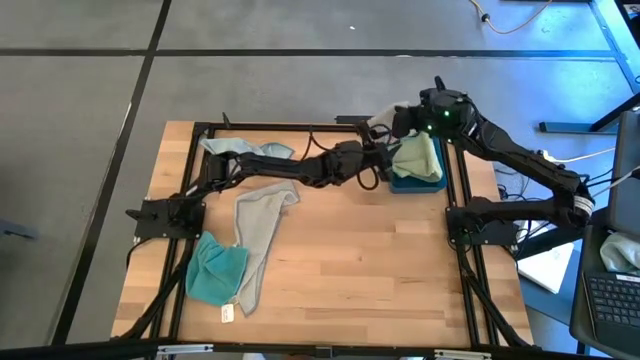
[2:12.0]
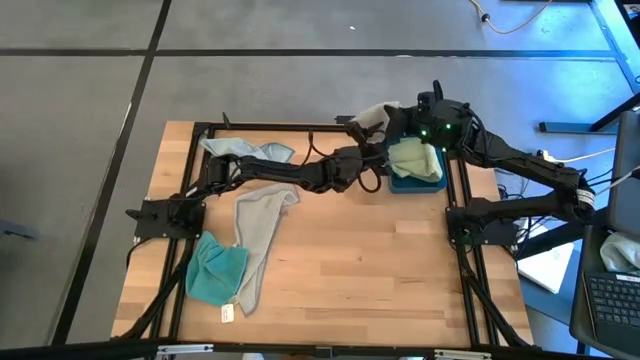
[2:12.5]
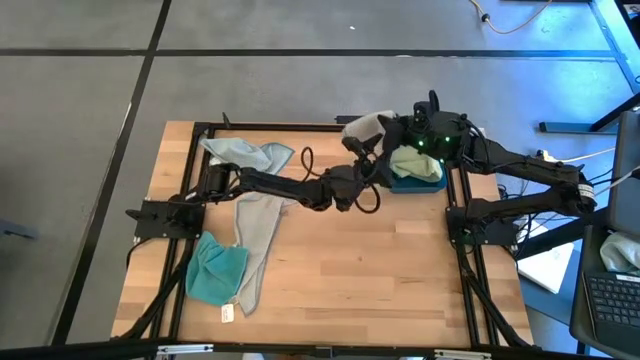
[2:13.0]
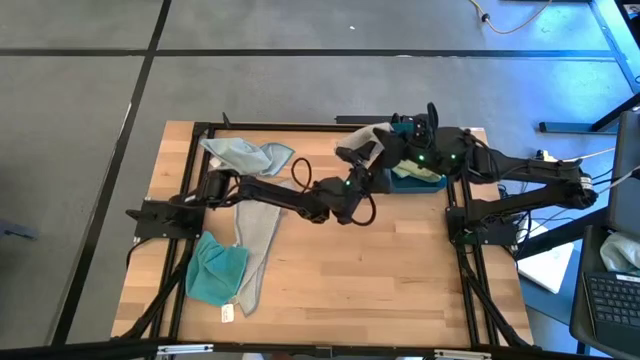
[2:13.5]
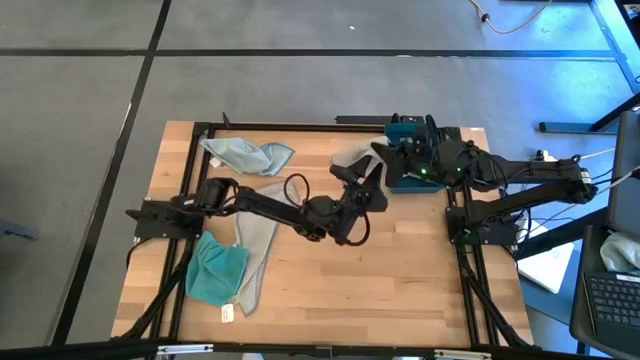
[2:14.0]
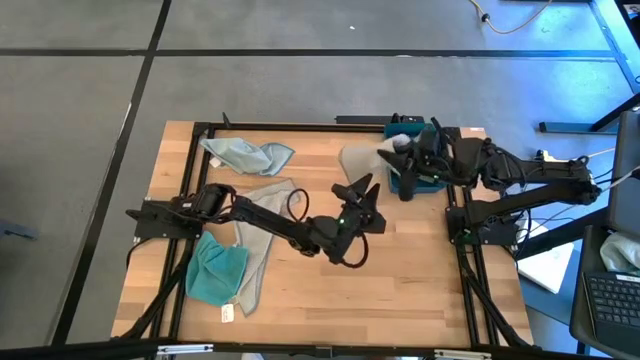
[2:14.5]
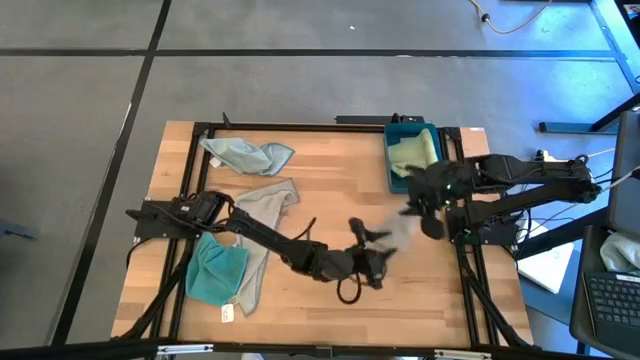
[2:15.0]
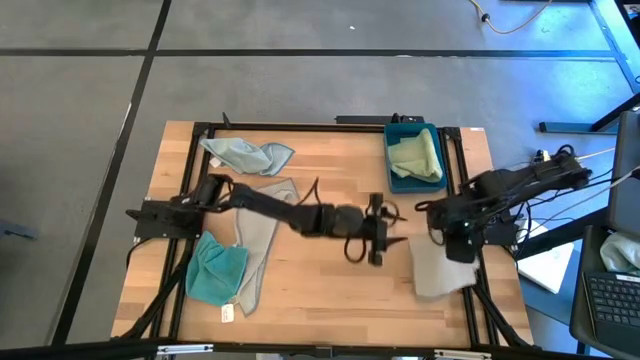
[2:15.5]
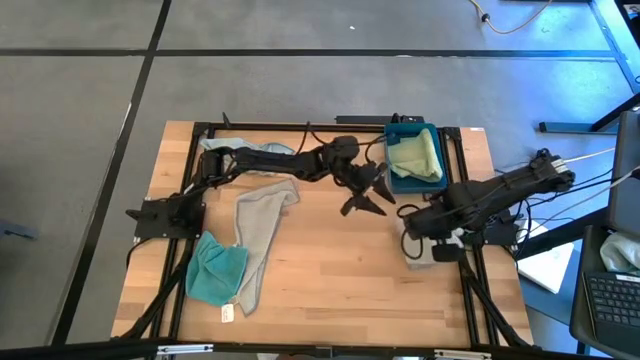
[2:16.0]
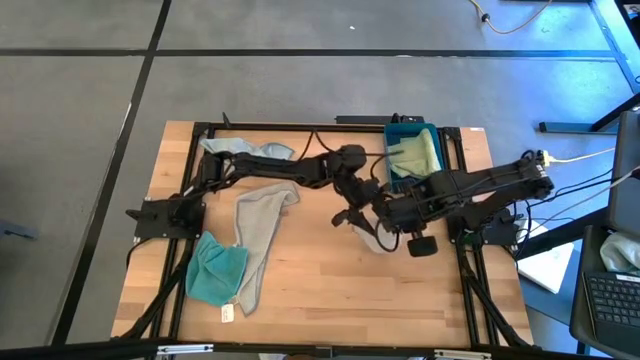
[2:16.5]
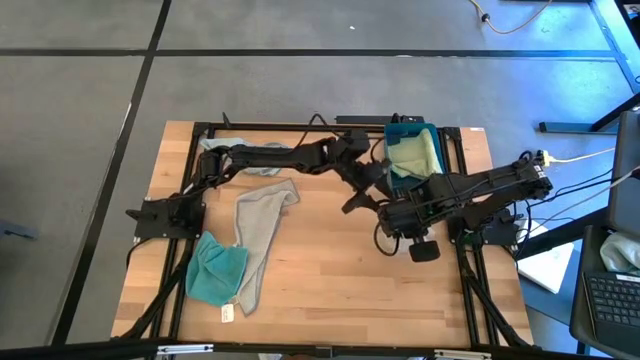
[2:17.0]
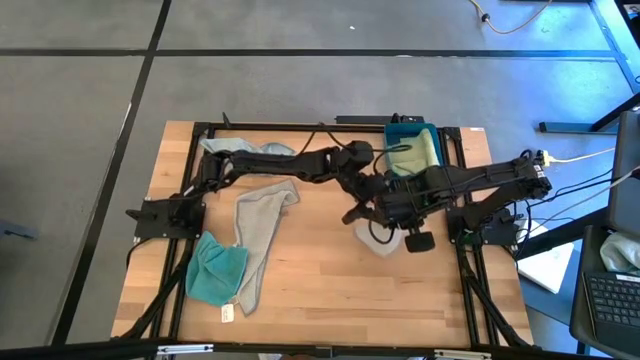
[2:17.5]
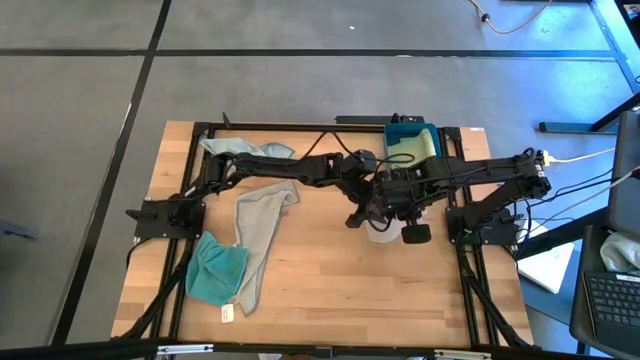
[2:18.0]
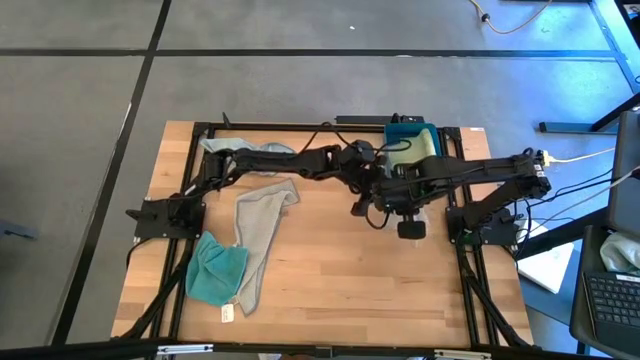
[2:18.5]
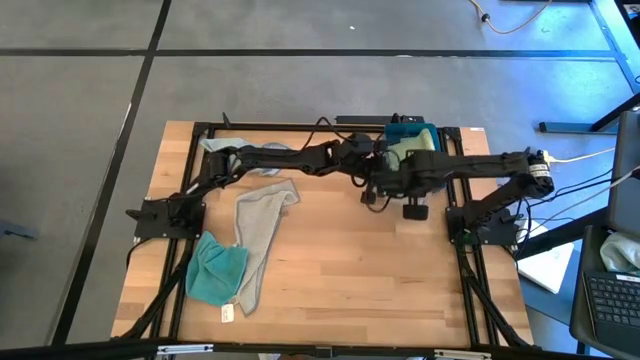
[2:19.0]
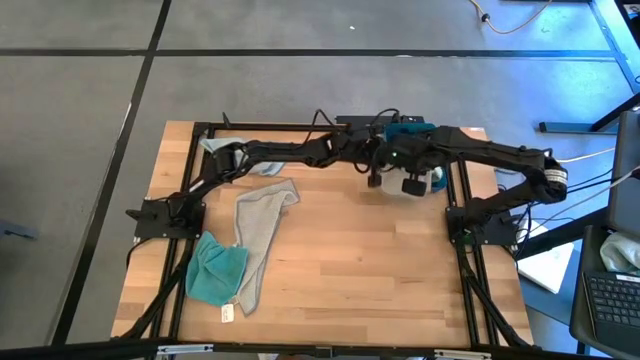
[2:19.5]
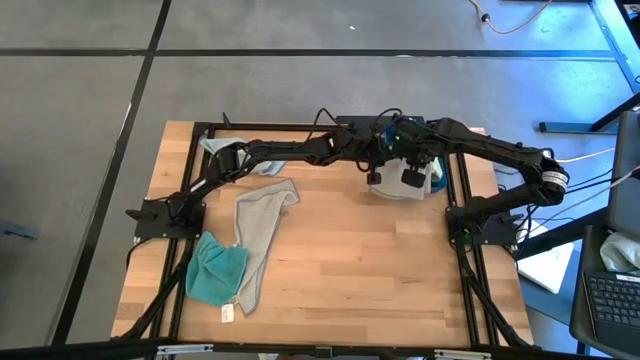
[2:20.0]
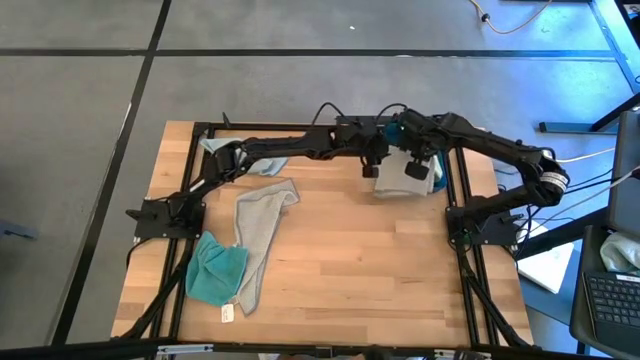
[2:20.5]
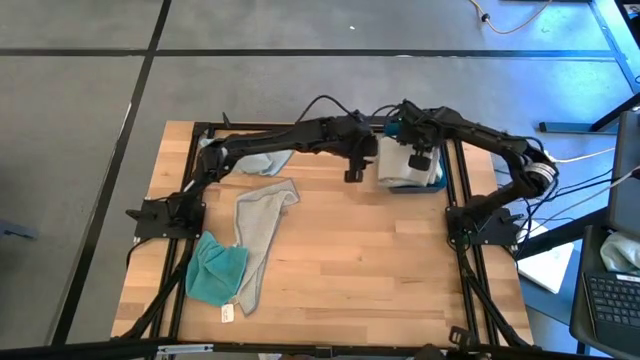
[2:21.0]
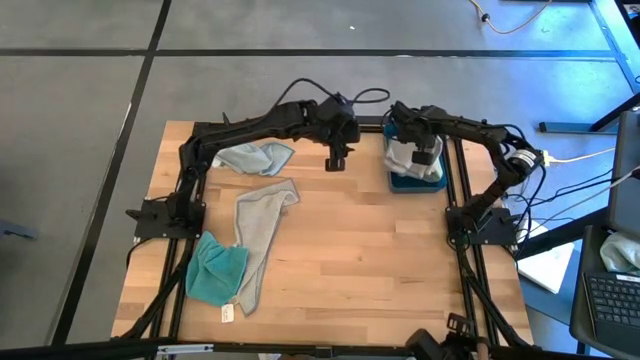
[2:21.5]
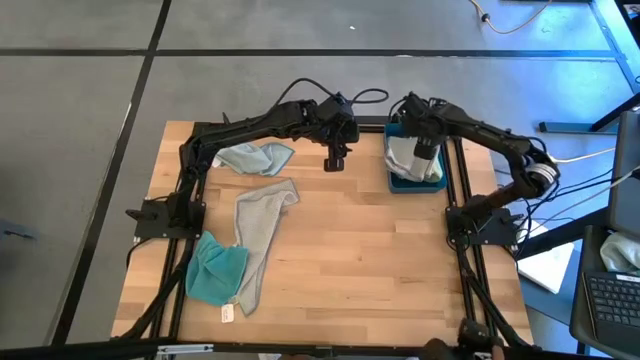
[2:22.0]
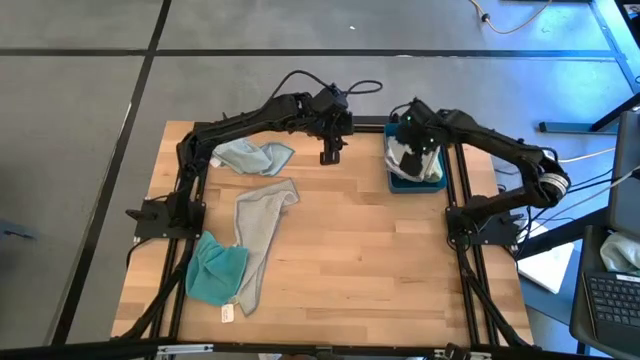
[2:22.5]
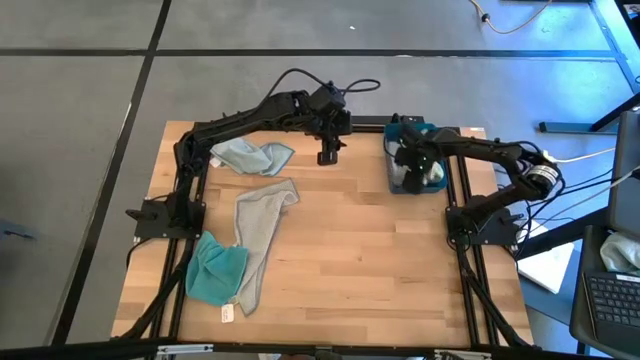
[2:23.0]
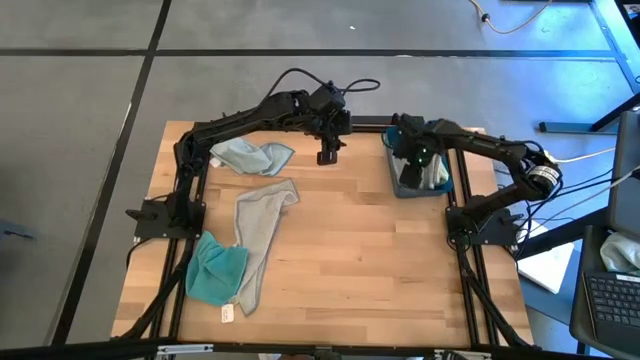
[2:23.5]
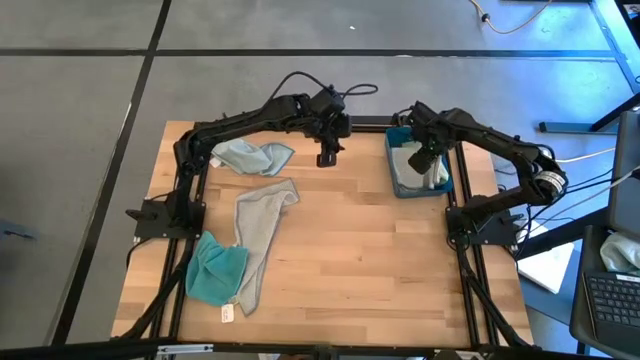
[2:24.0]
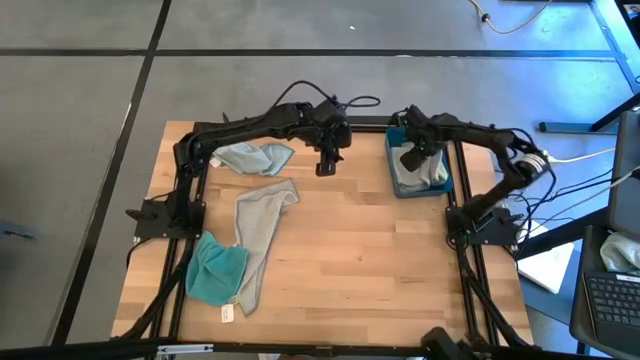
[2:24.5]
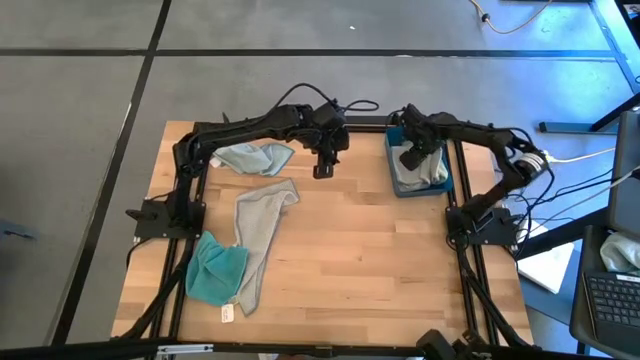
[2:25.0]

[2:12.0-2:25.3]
Task: Fold microfiber towels
Put the top grey microfiber cloth into the blue bin

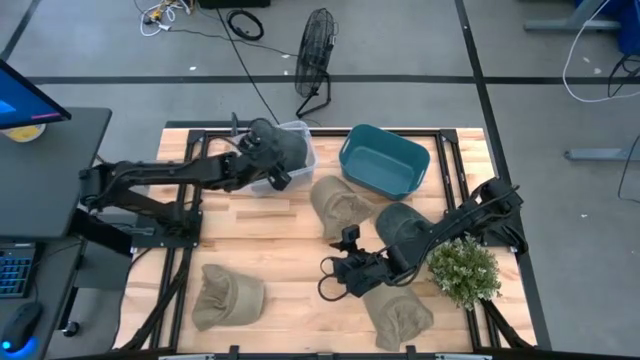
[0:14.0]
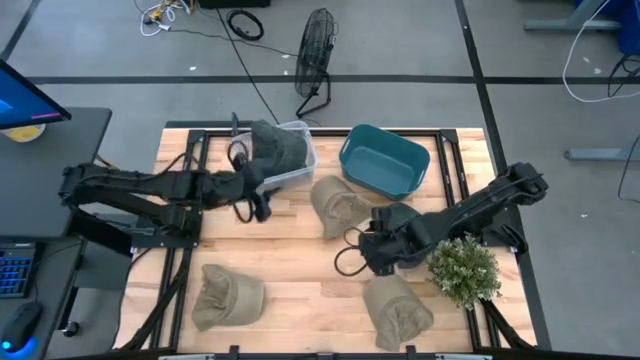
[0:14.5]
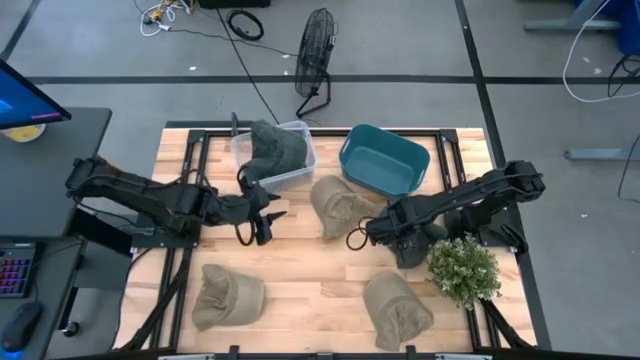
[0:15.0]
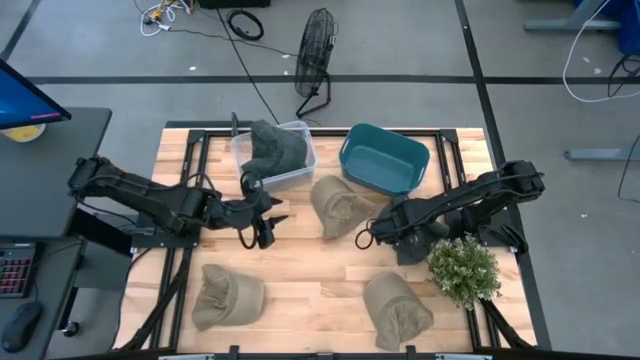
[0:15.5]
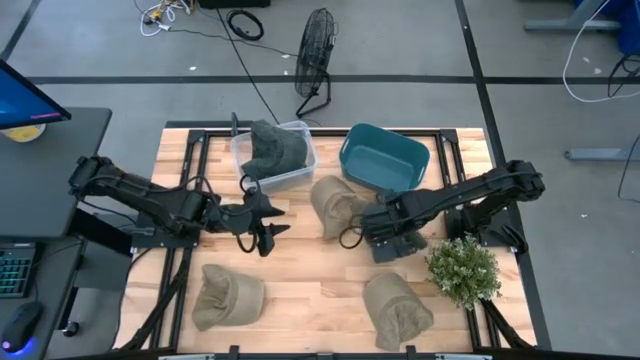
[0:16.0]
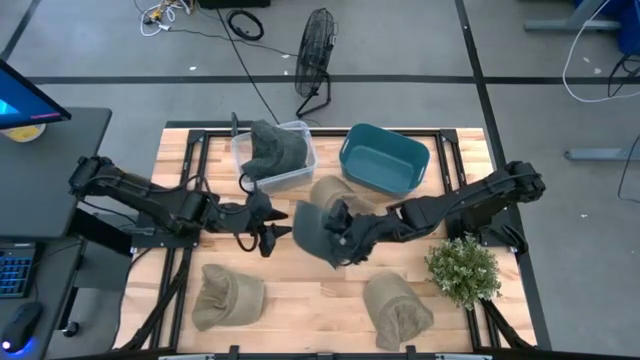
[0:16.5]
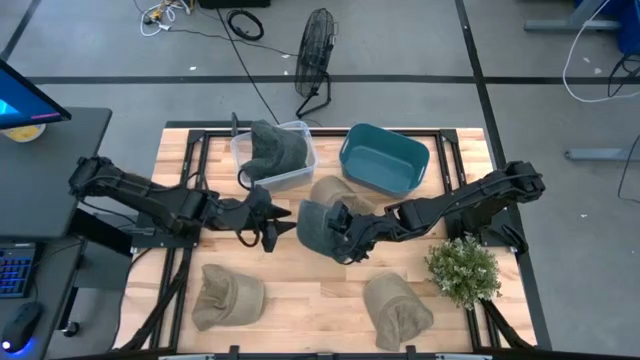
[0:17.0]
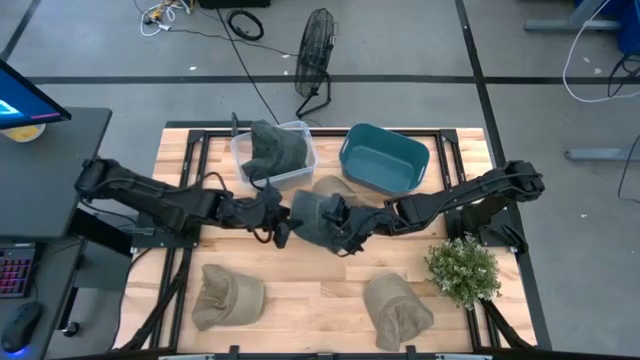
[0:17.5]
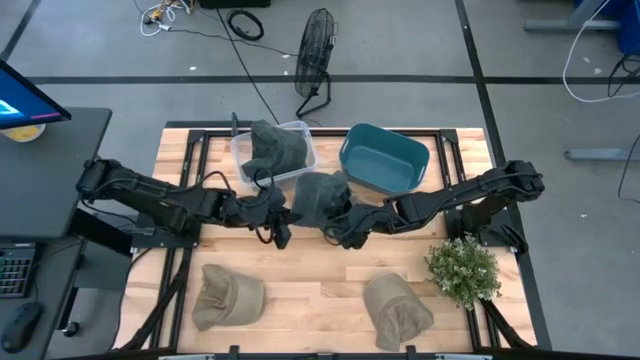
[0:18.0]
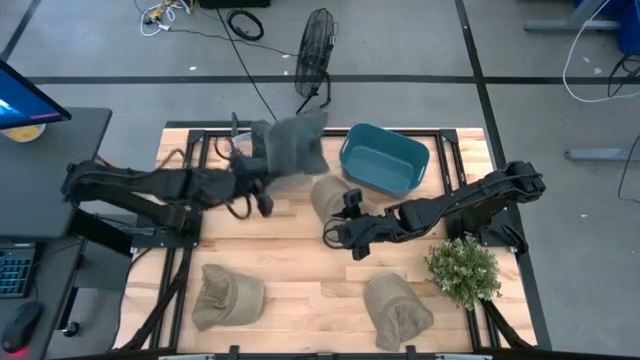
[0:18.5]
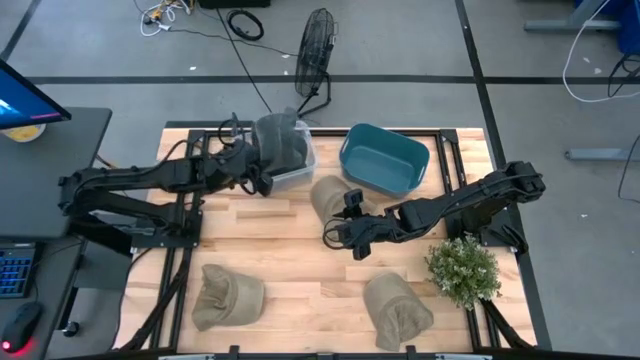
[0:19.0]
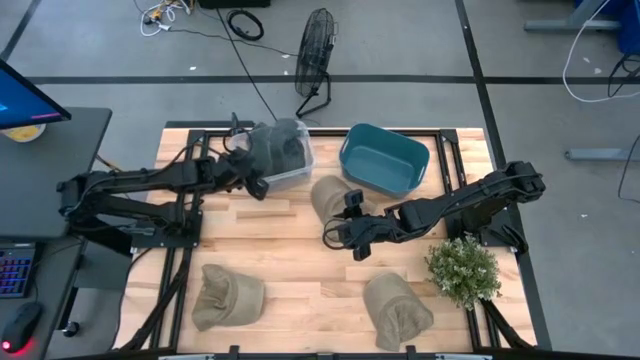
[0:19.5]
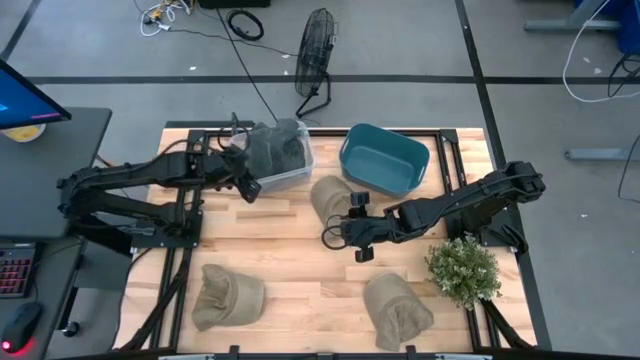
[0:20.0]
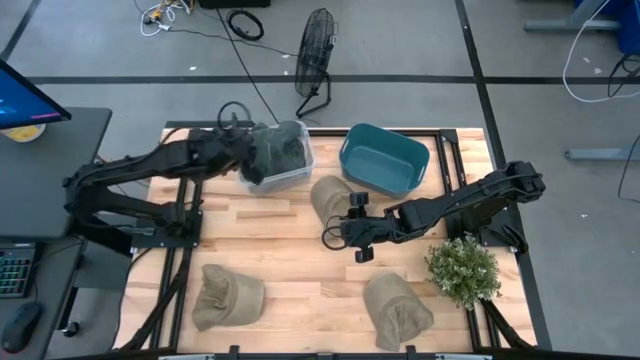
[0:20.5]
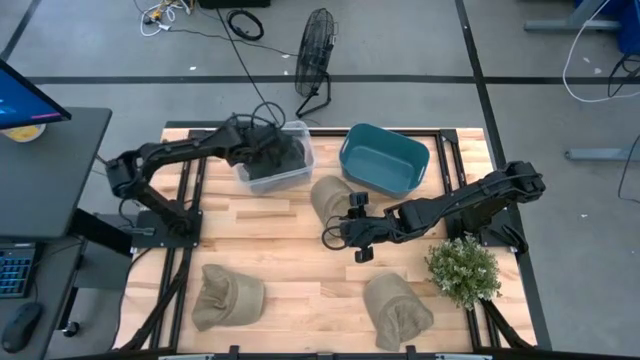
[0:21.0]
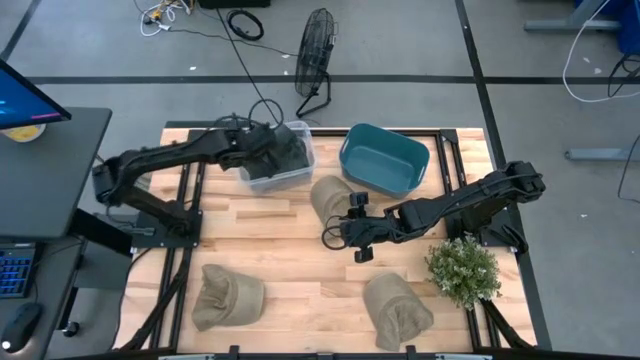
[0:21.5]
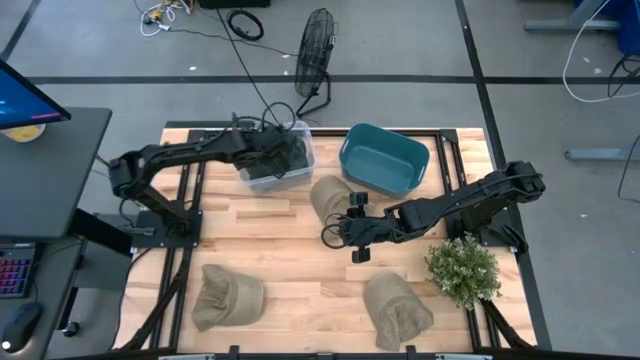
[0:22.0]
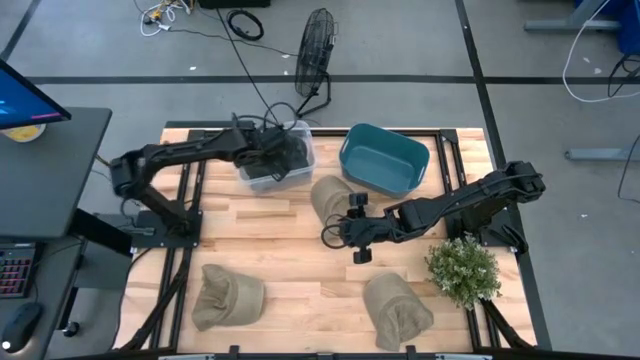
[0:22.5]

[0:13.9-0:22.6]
Task: Pick & Place hat
Put the blue cap into the transparent bin
